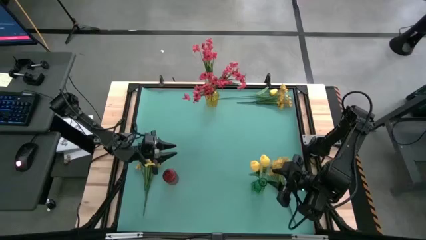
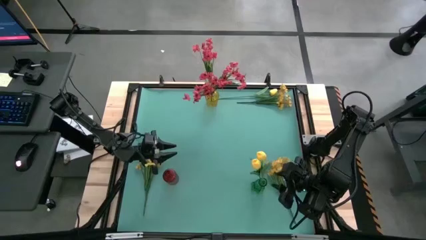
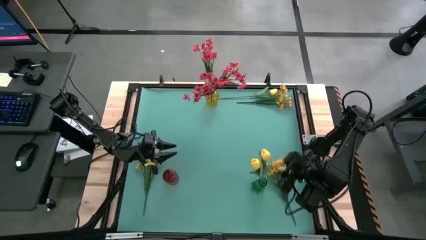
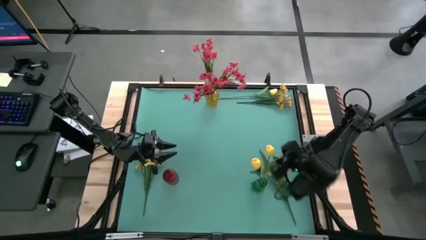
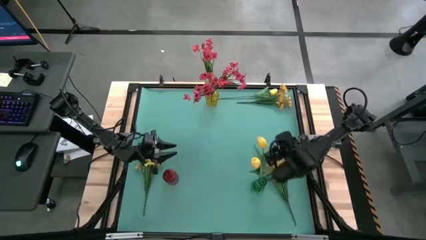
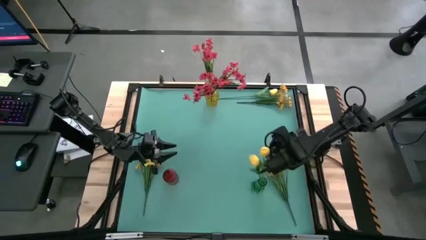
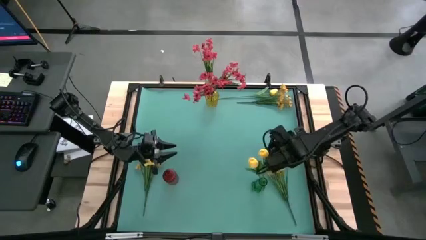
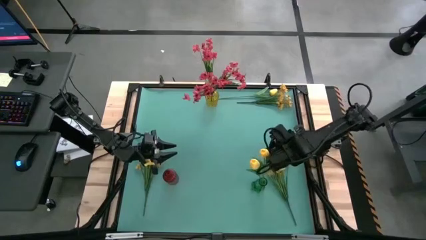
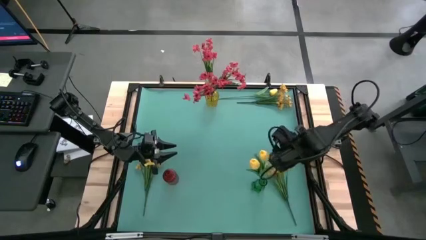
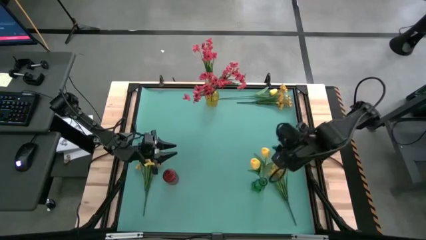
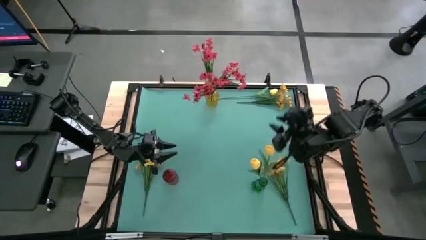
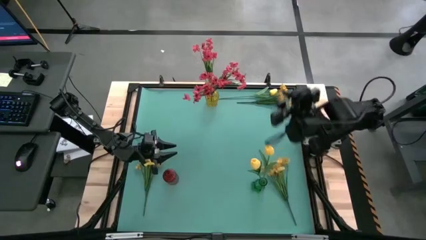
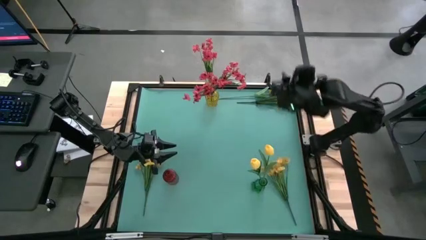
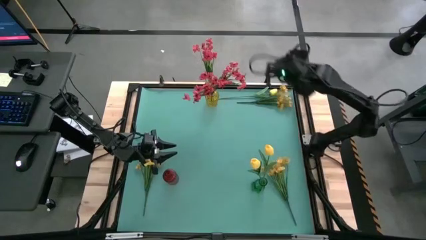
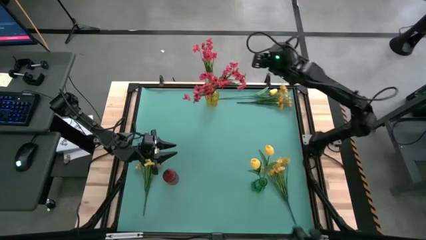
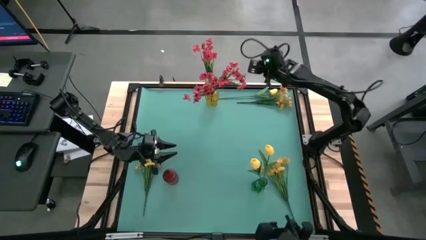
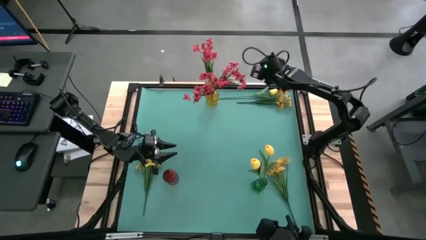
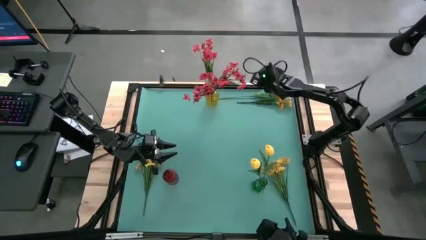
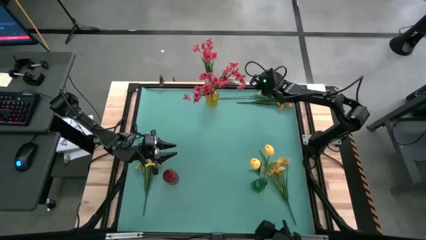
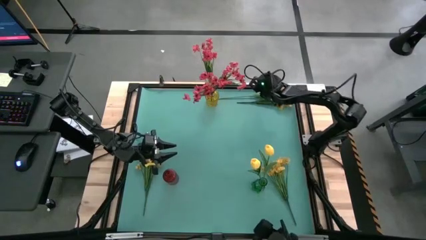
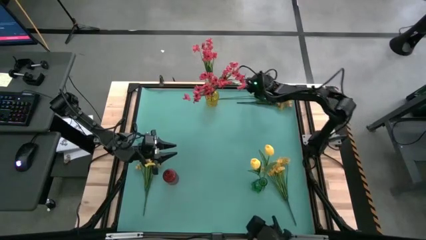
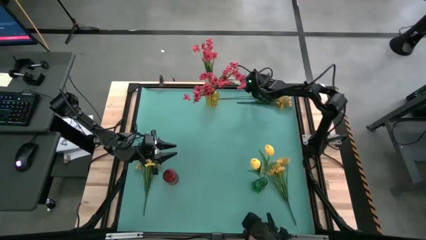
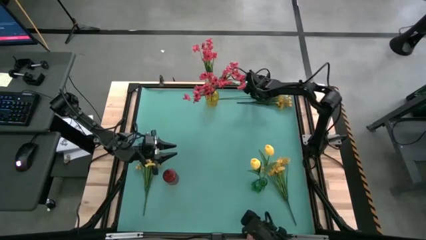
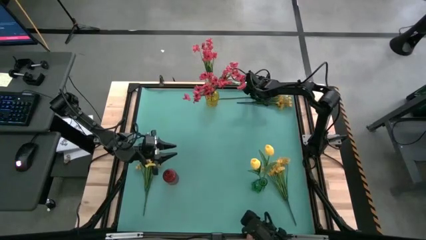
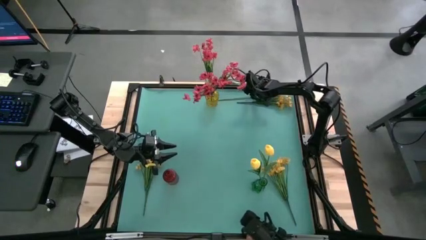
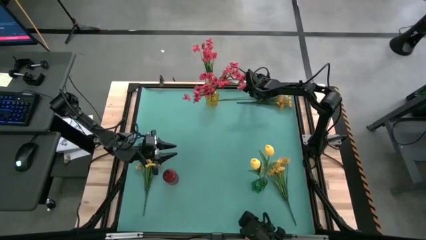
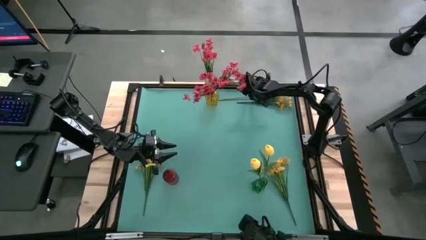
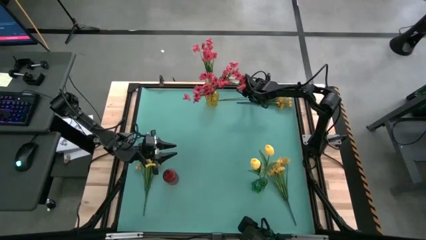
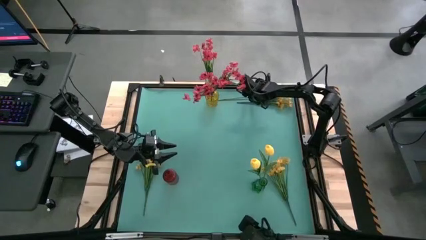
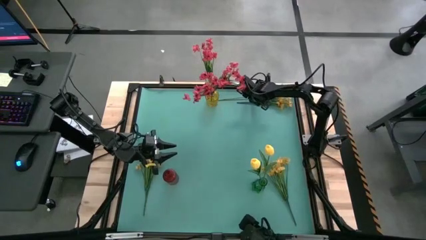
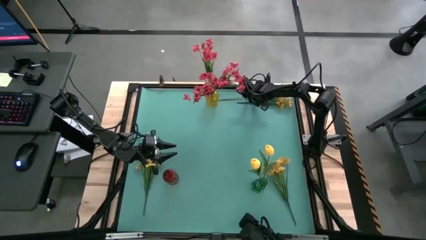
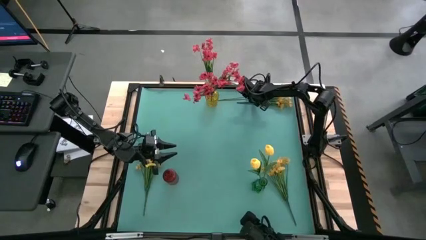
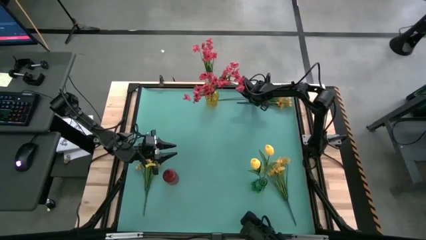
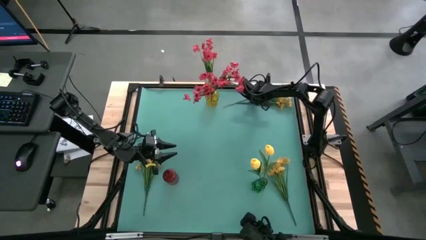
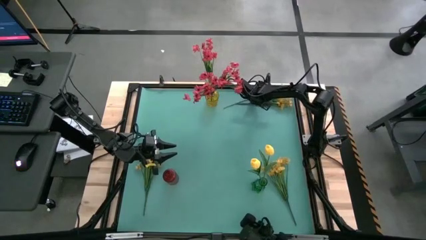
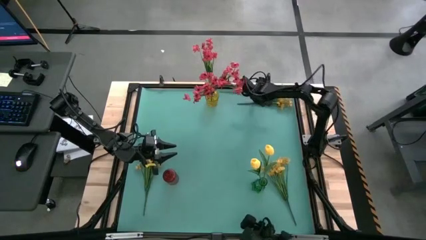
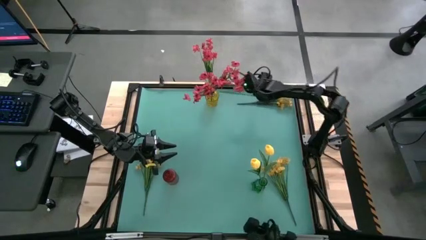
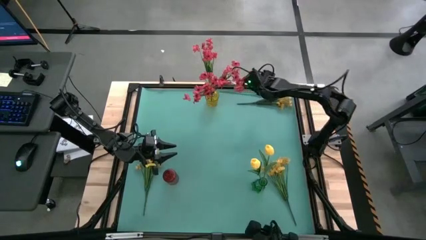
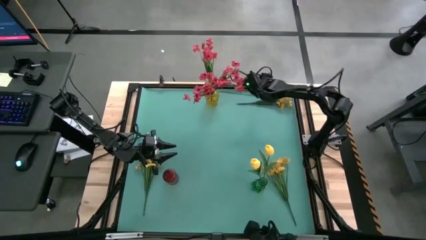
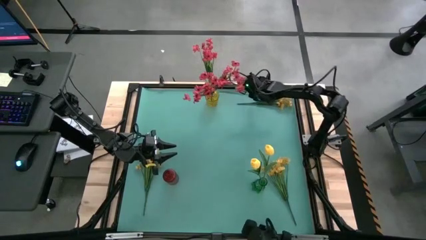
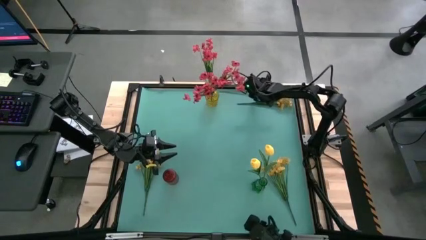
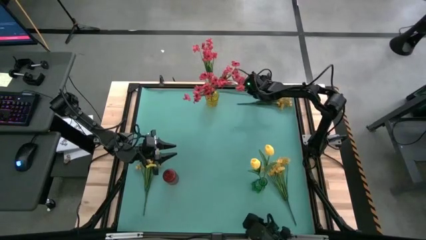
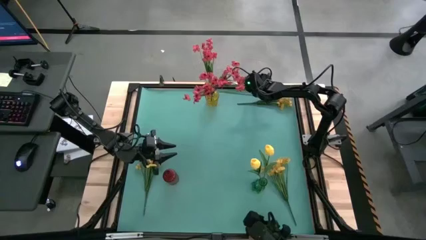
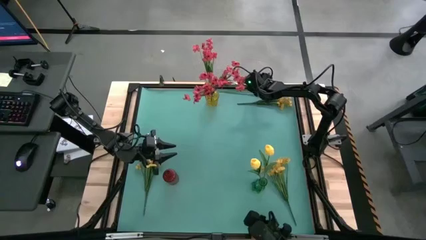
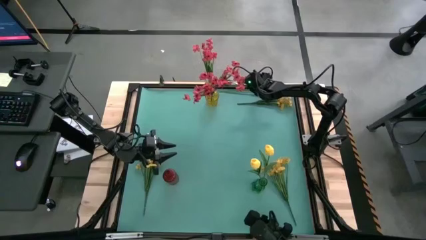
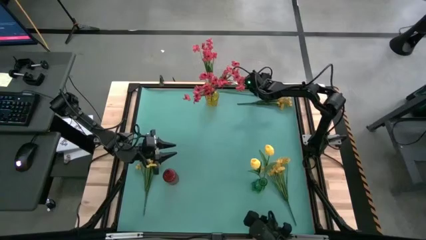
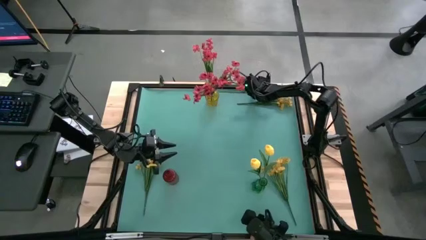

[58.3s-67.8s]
Task: Sort flowers into vase by color
Put the yellow tulip into the green vase
